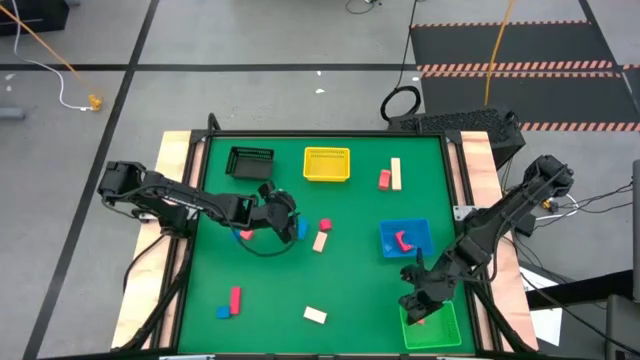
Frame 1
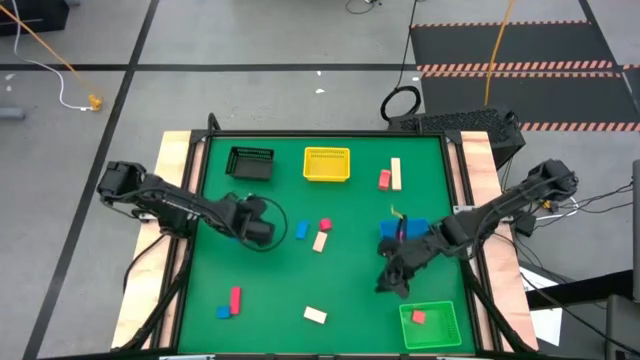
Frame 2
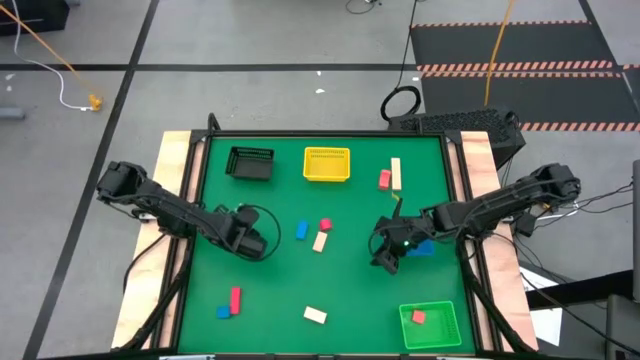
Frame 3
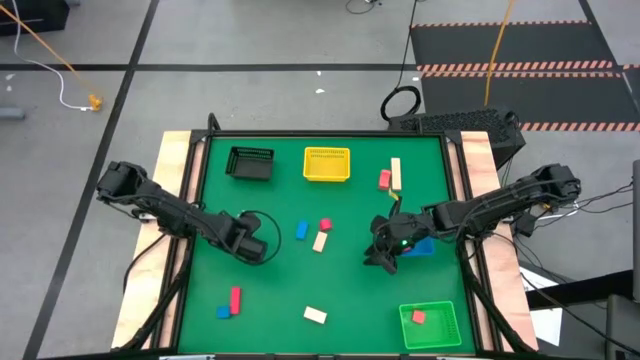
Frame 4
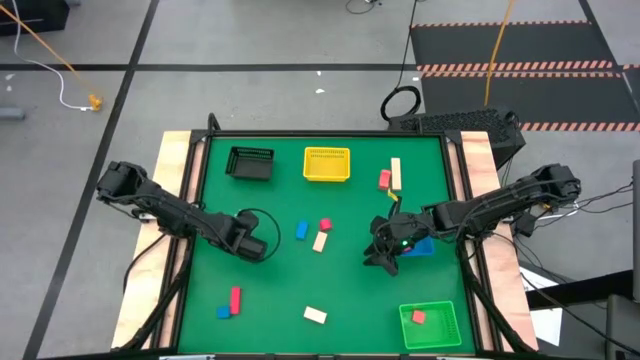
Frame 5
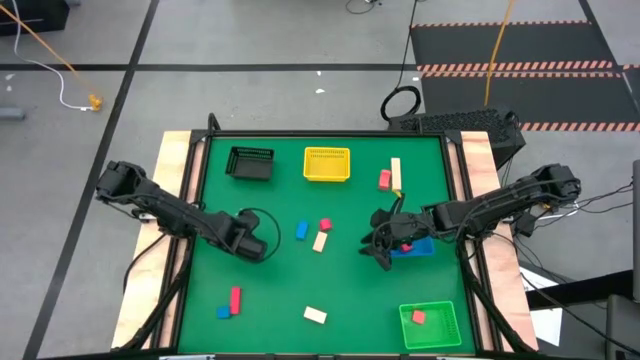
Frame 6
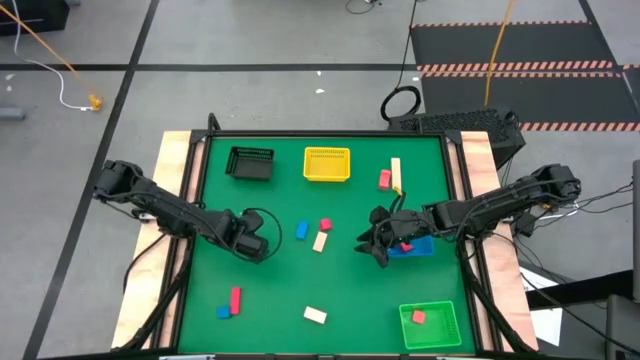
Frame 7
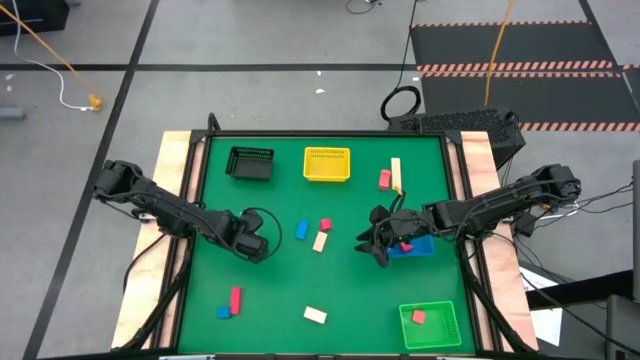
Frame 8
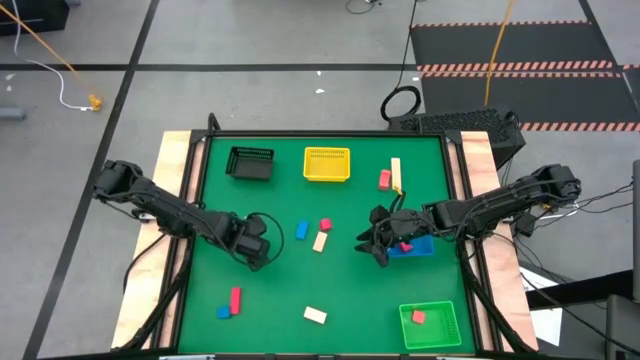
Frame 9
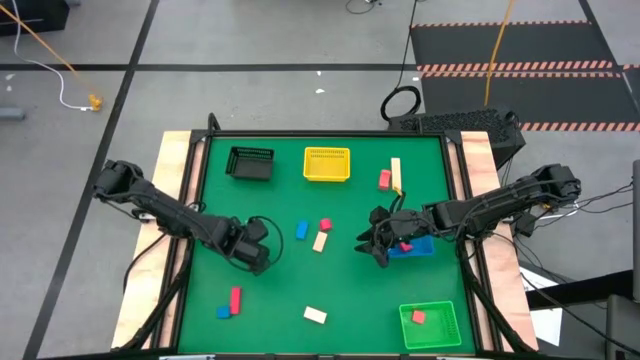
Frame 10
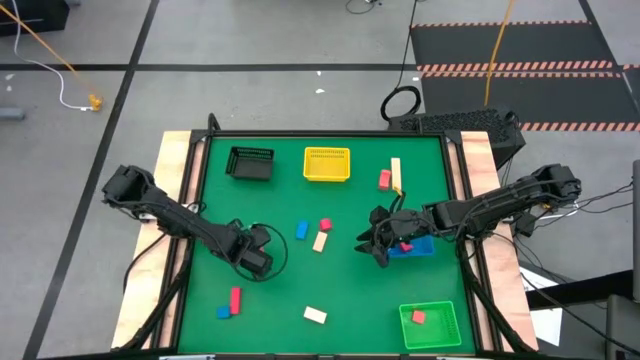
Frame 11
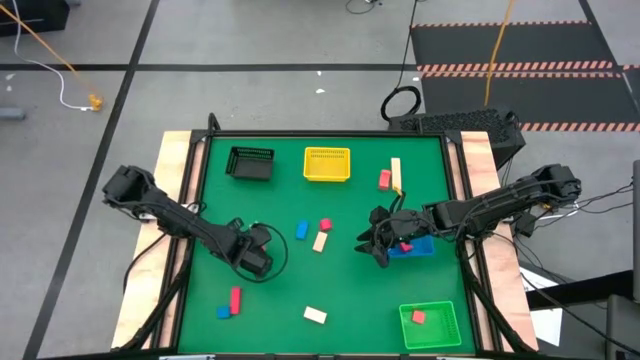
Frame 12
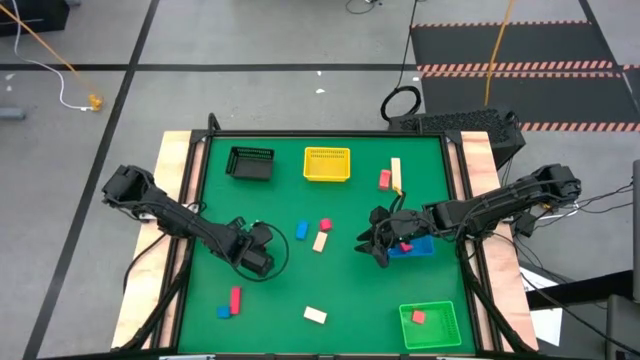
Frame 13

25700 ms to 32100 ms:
Task: Sort & place blocks by color
Put the bottom orange block into the green bin

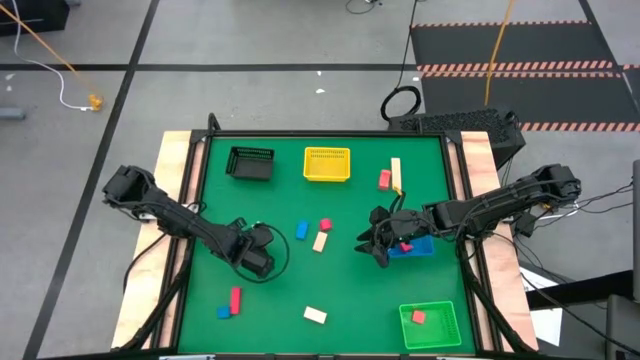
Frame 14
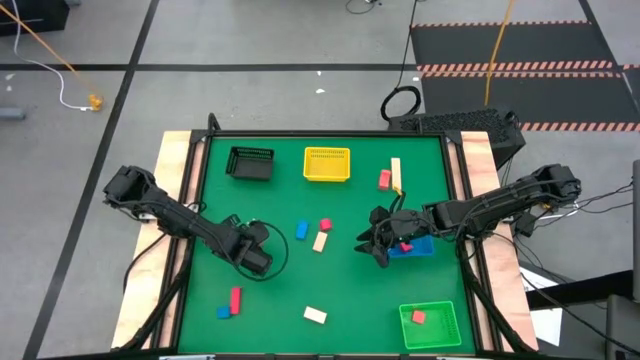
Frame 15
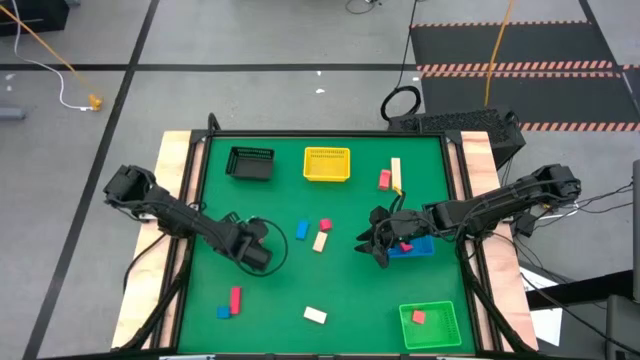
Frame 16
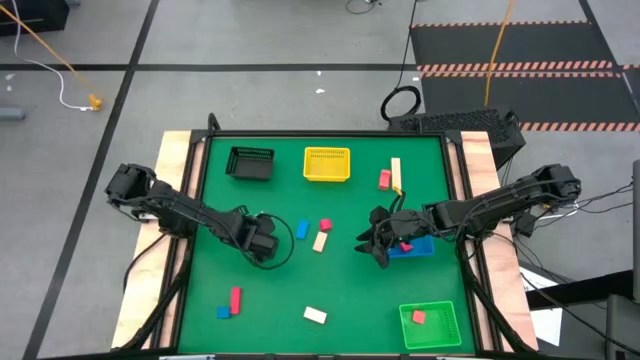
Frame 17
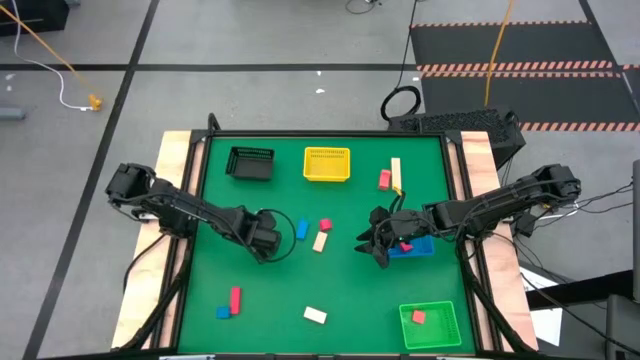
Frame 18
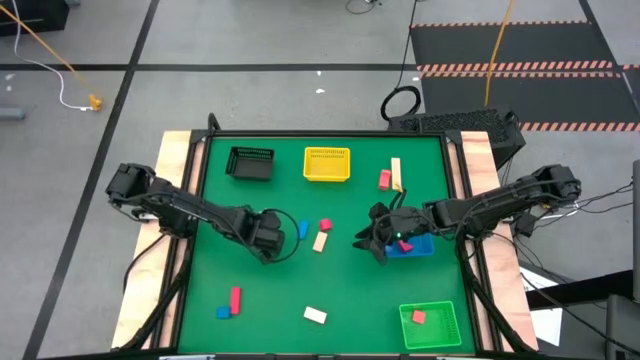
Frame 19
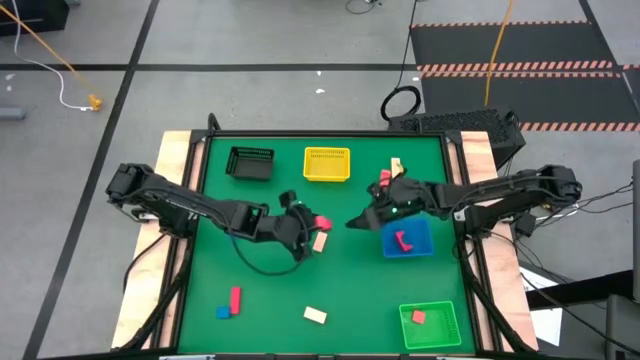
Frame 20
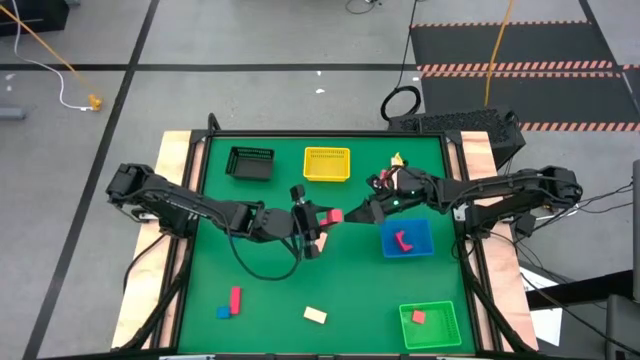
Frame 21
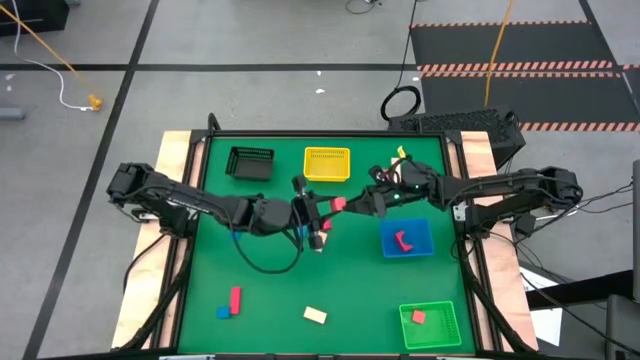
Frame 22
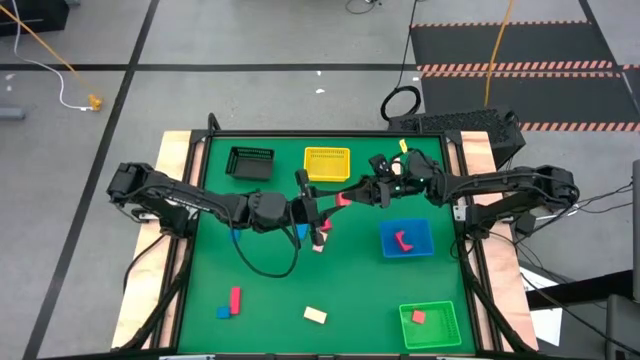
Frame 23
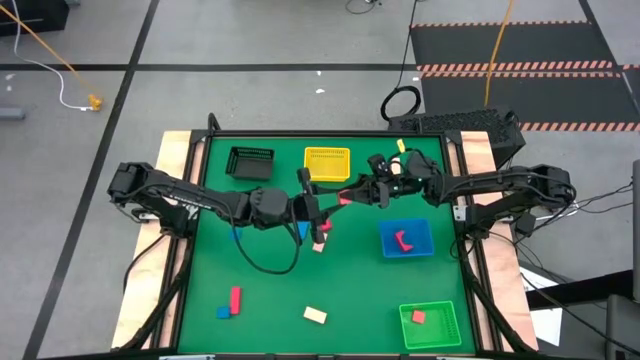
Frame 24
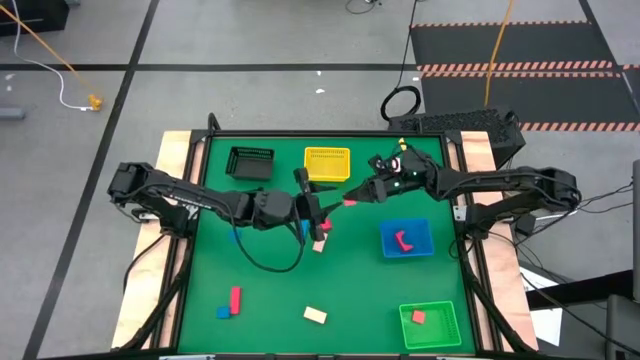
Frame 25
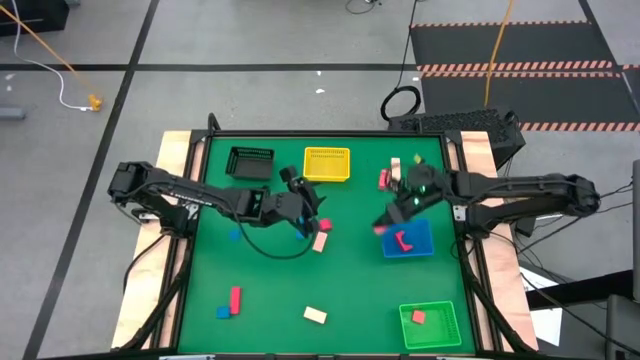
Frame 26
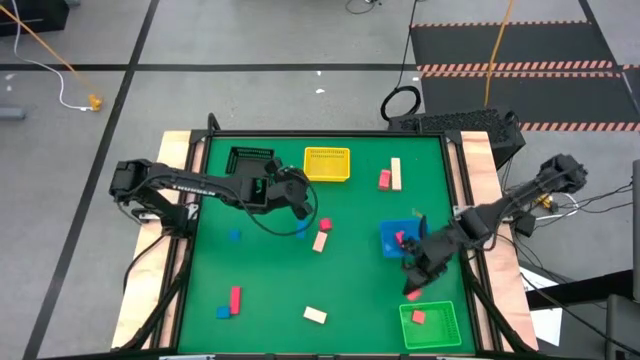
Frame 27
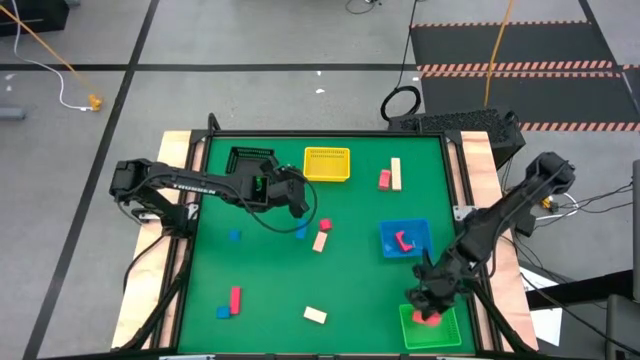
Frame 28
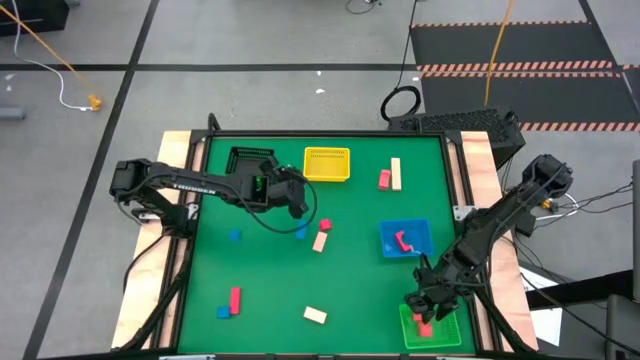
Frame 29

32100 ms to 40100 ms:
Put the bottom orange block into the green bin

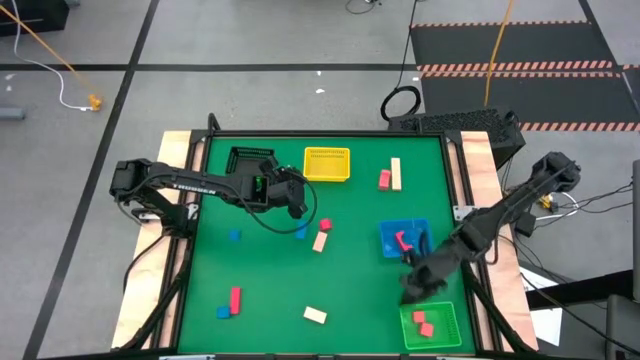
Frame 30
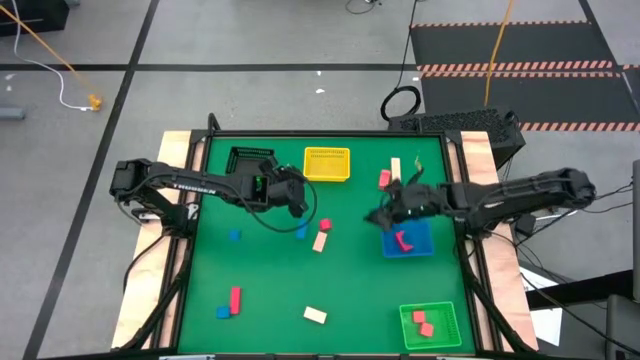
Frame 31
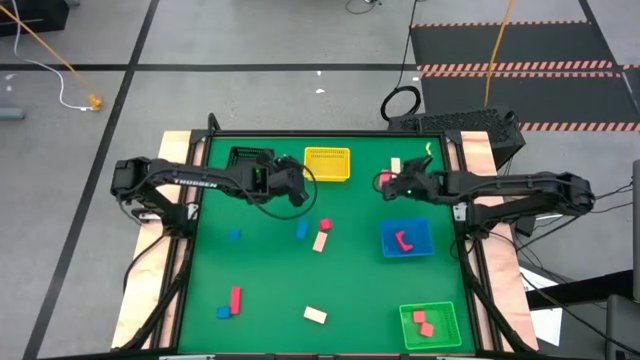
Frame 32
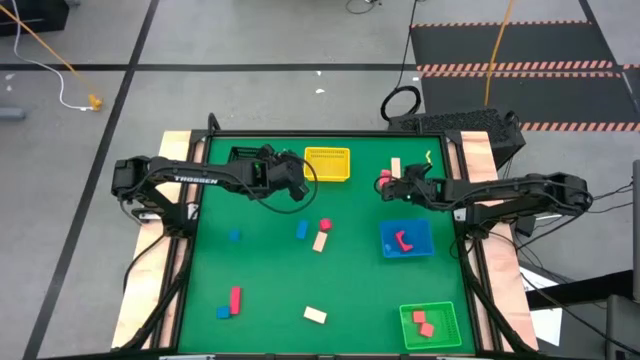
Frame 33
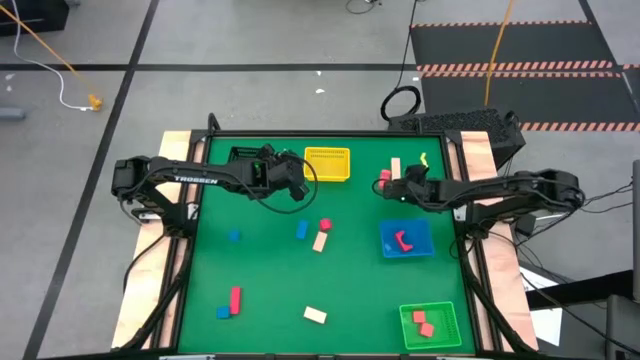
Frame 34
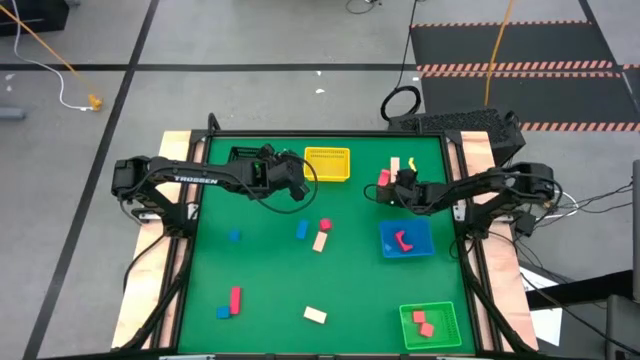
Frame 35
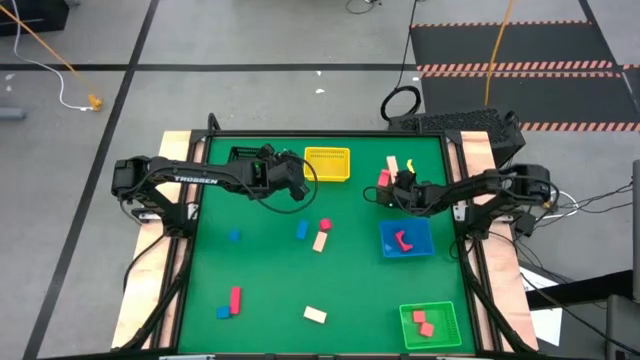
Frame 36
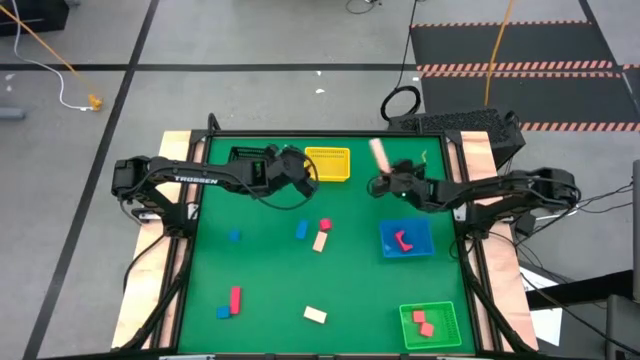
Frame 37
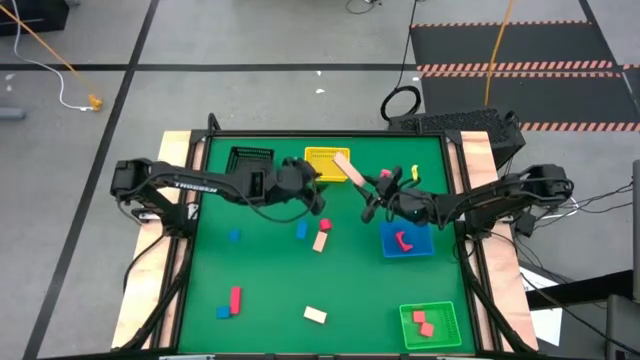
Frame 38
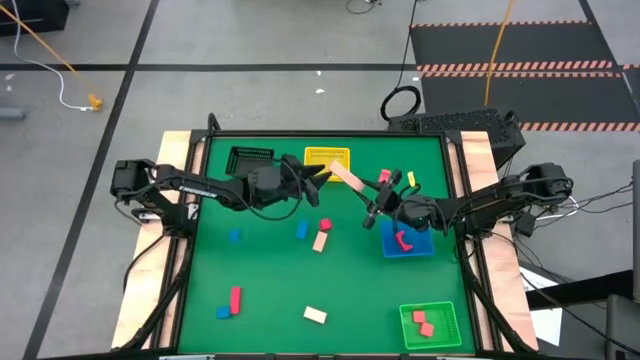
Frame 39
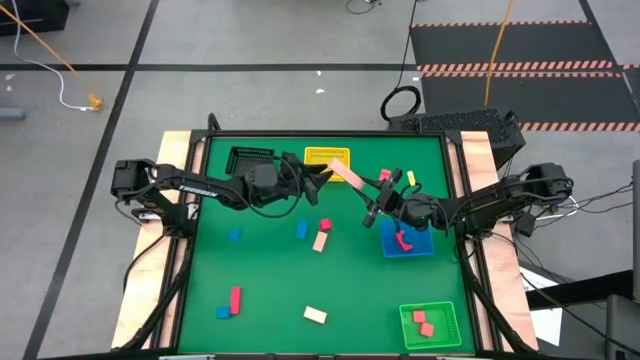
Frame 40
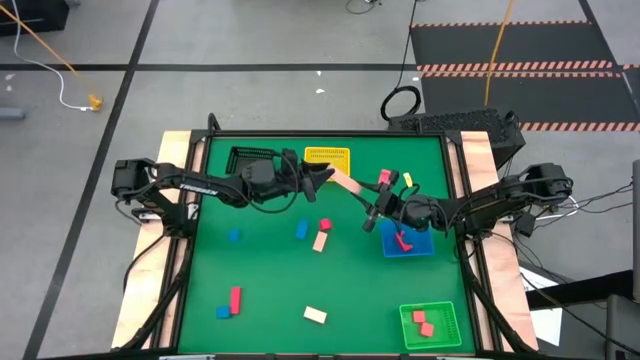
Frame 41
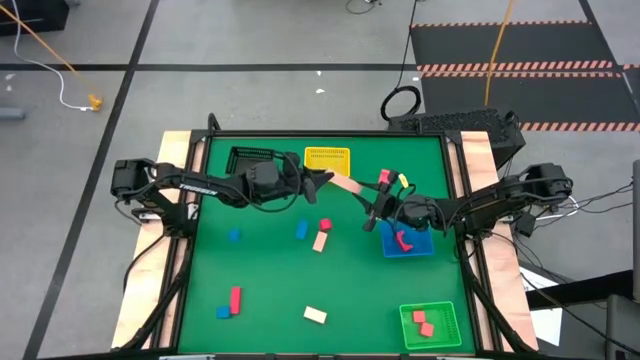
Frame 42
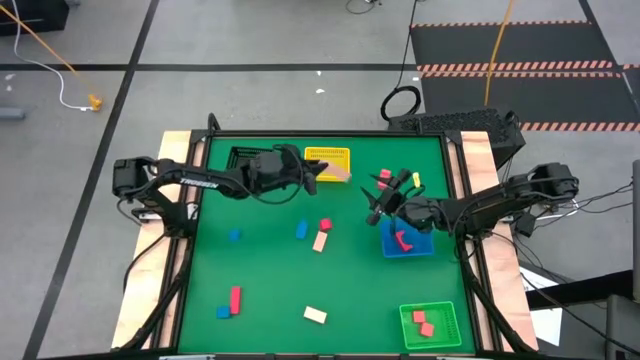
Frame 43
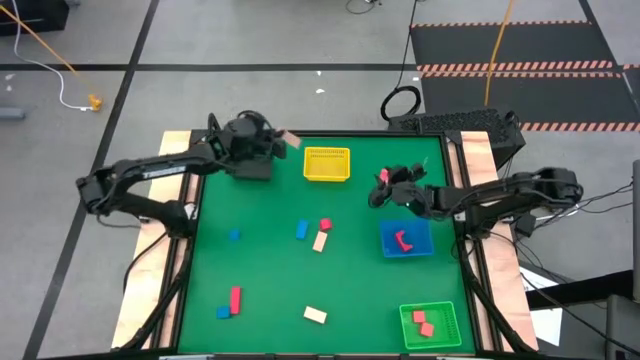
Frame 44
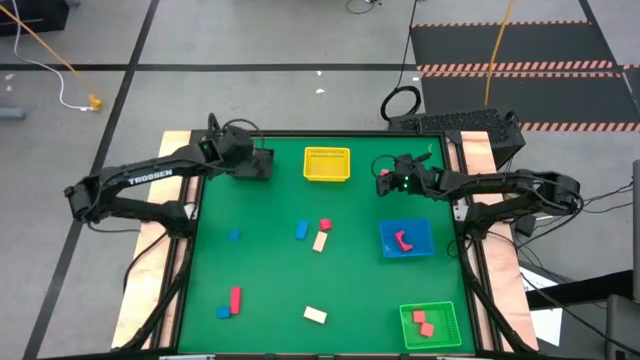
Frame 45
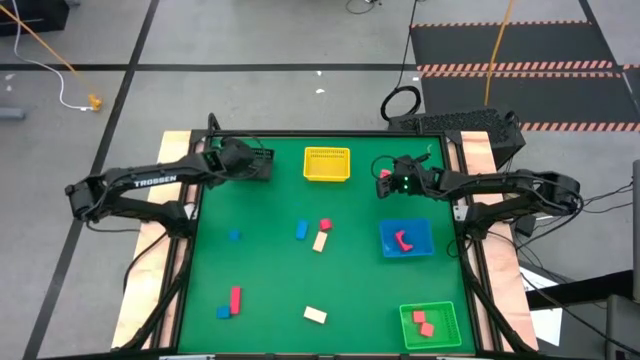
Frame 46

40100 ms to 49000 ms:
Put the top brown block into the black bin
